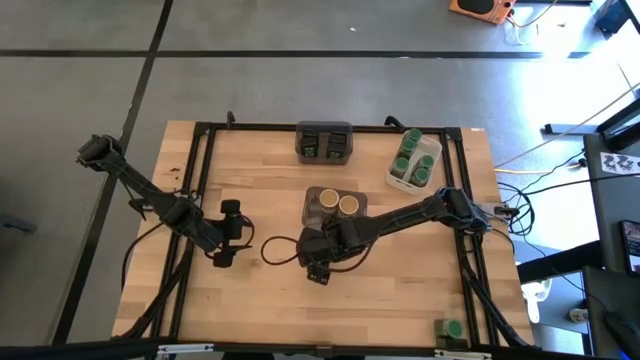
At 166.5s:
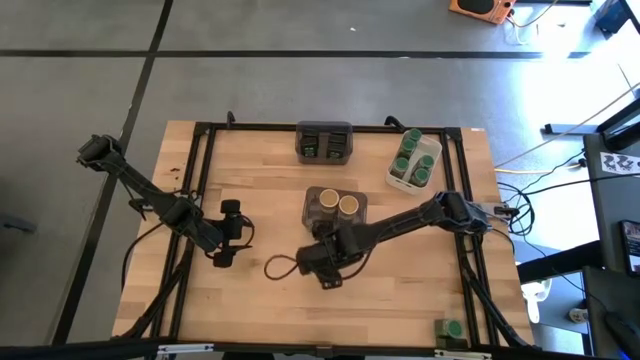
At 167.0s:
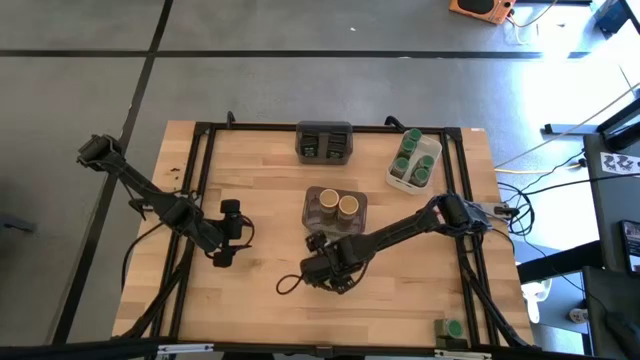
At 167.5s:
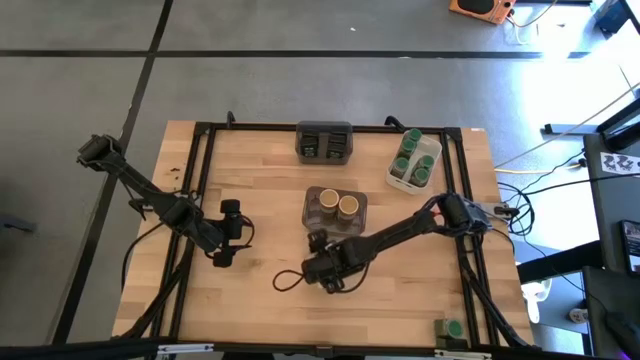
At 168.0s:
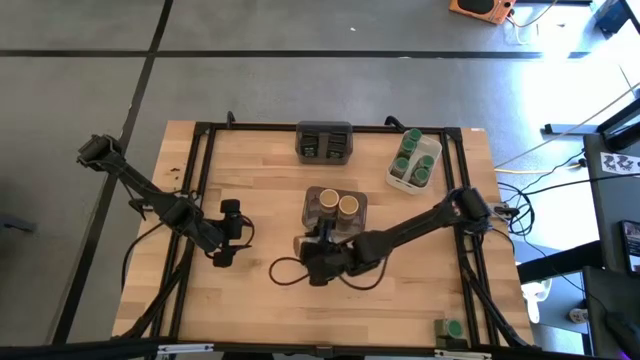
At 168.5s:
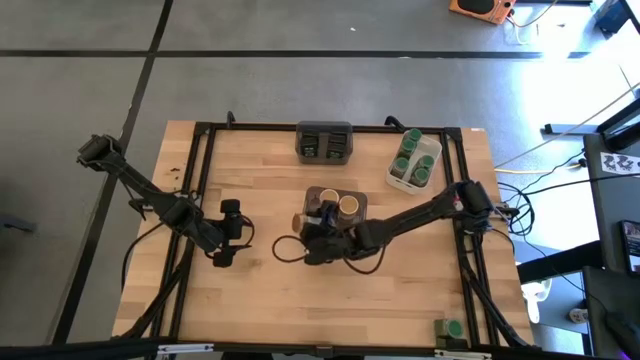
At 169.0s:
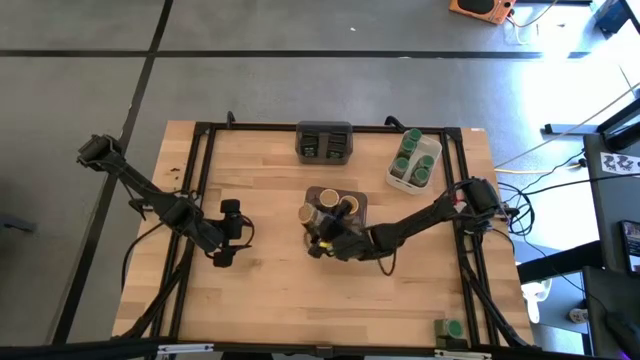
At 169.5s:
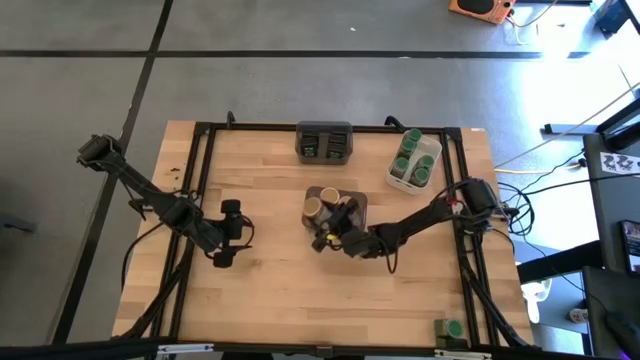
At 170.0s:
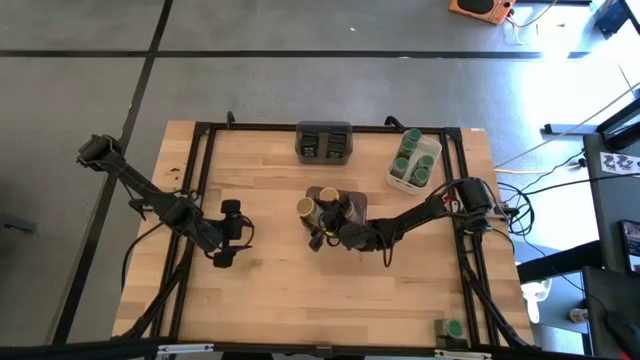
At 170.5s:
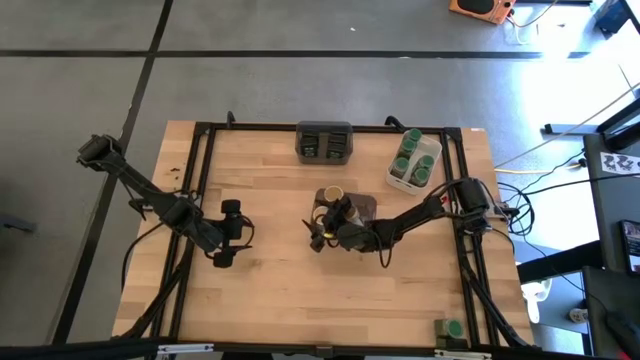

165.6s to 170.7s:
Task: Sort spices by type
Put the golden seasoning bottle into the bottom black bin

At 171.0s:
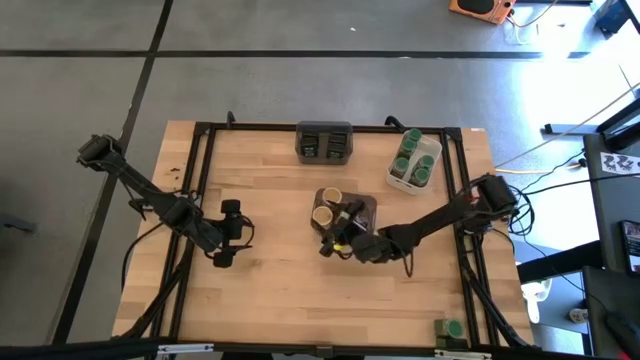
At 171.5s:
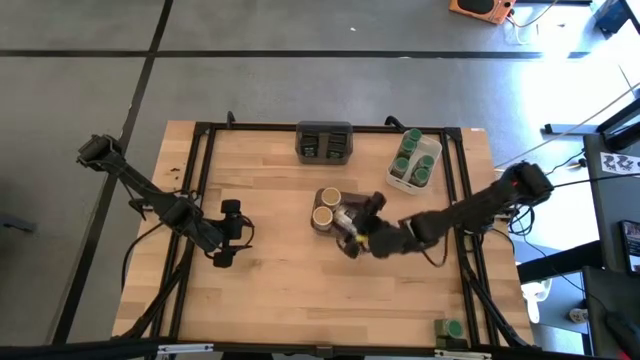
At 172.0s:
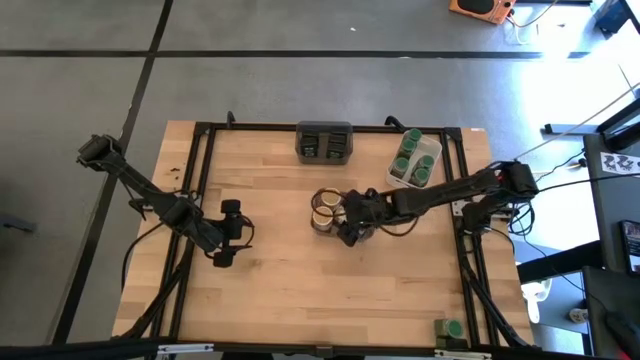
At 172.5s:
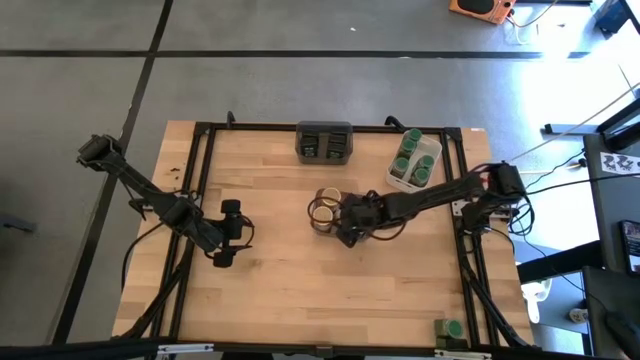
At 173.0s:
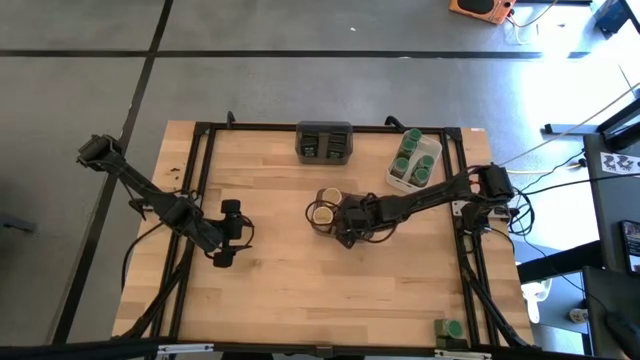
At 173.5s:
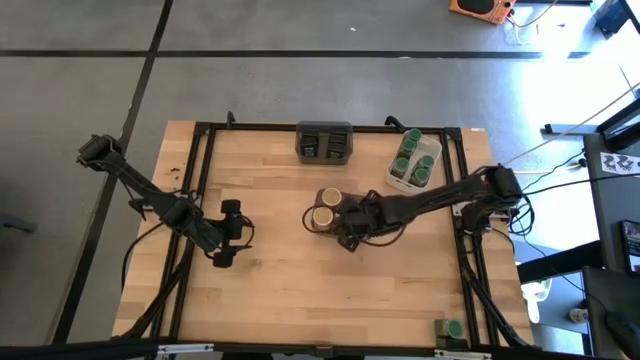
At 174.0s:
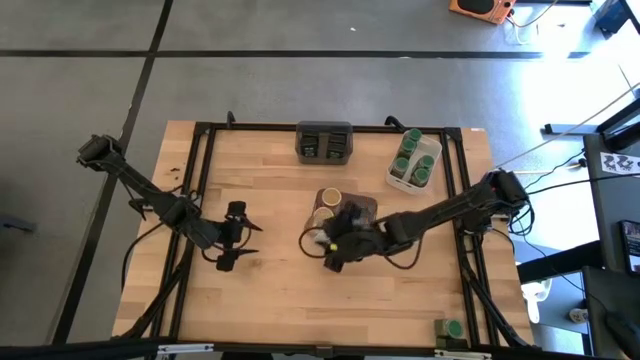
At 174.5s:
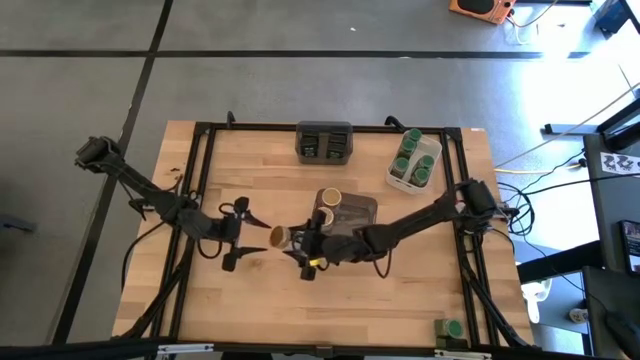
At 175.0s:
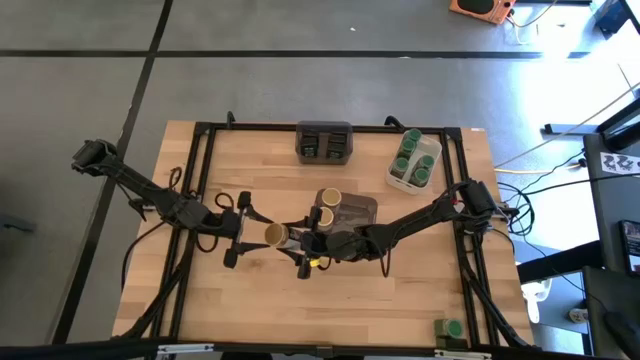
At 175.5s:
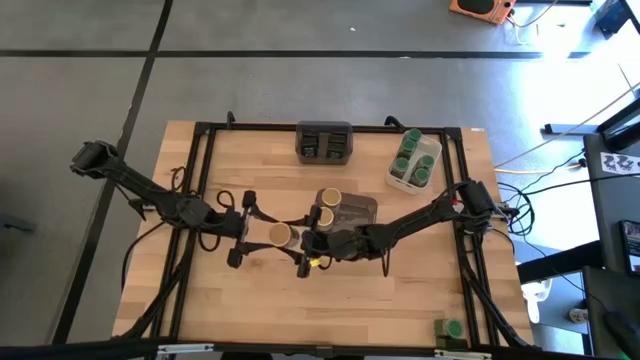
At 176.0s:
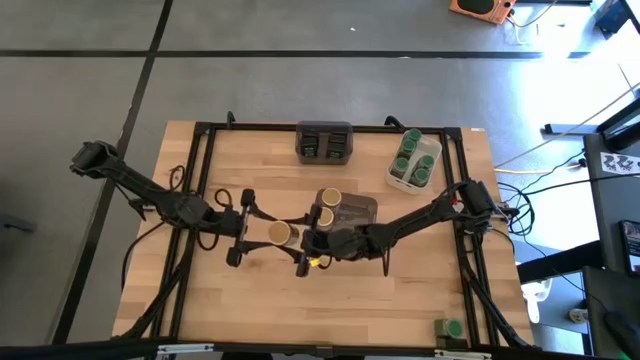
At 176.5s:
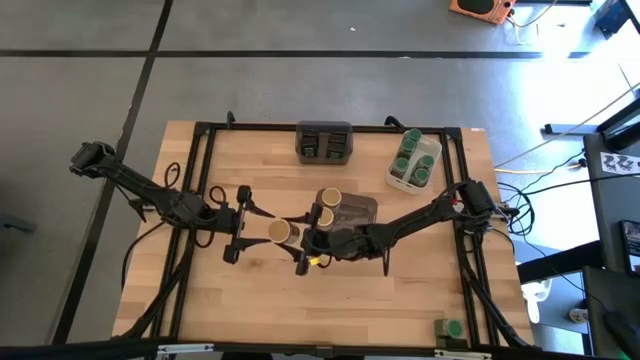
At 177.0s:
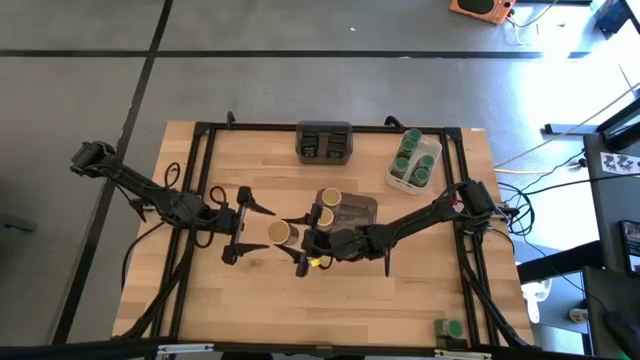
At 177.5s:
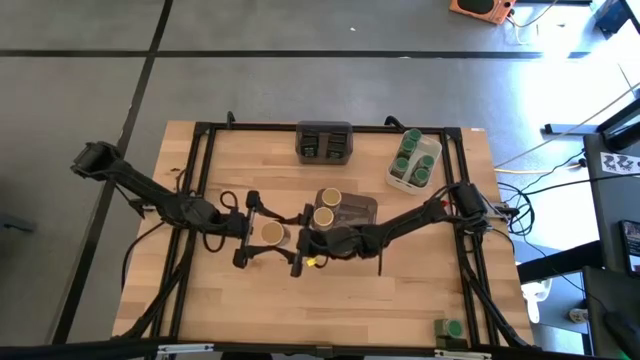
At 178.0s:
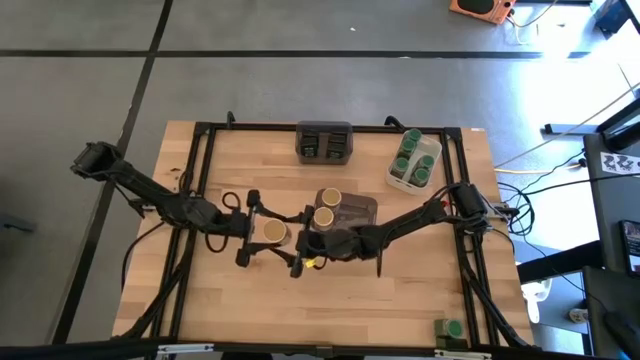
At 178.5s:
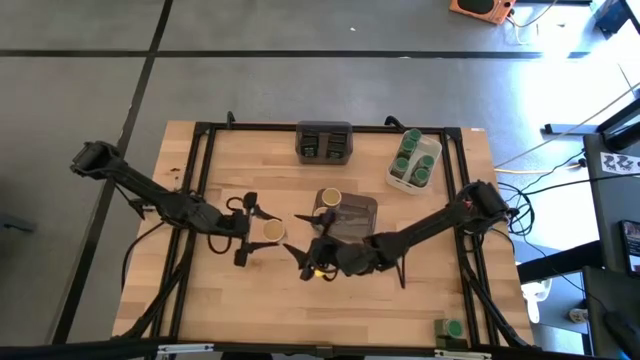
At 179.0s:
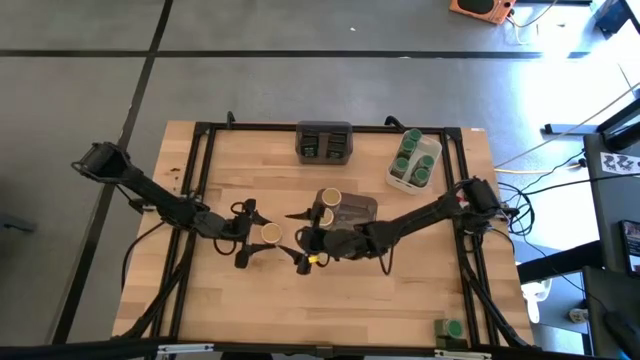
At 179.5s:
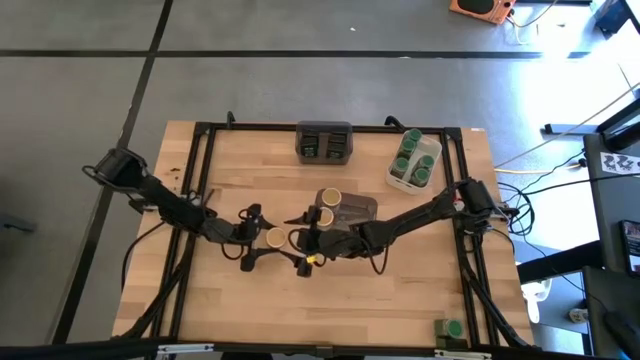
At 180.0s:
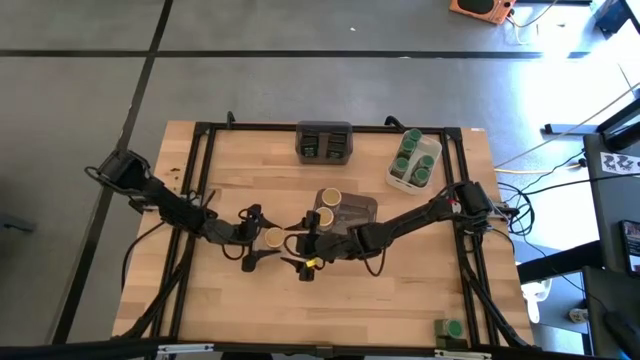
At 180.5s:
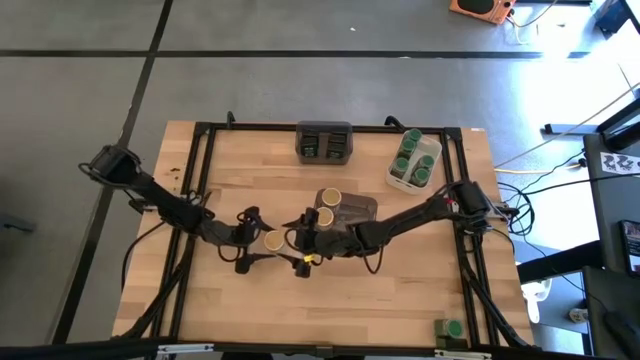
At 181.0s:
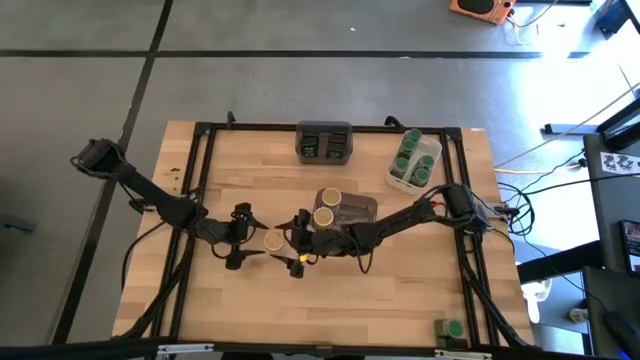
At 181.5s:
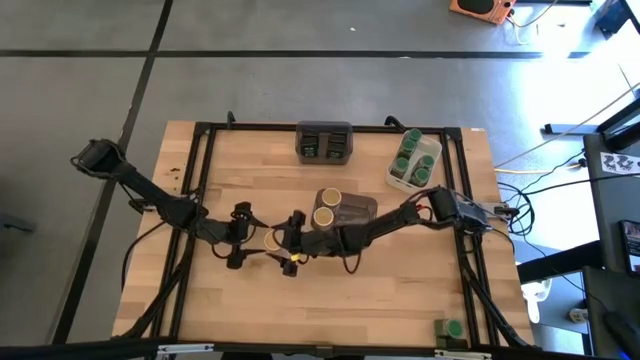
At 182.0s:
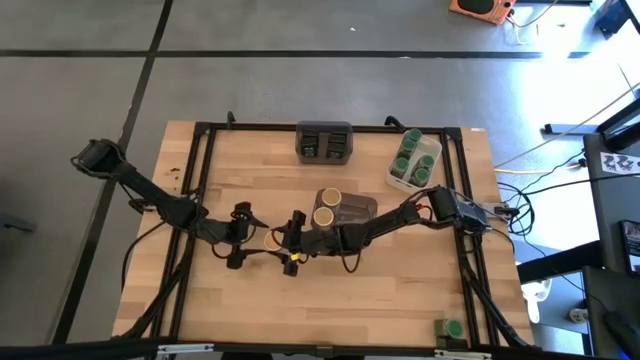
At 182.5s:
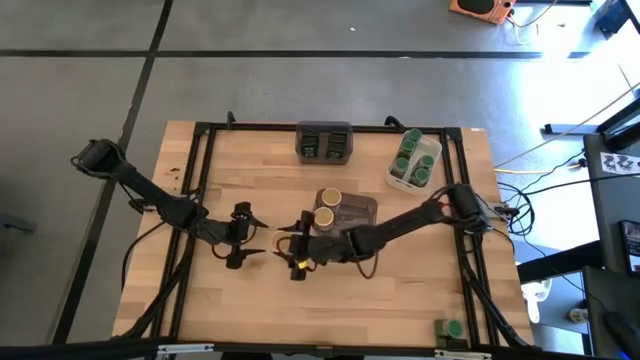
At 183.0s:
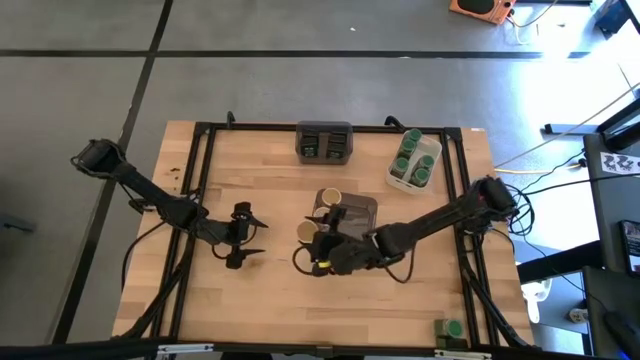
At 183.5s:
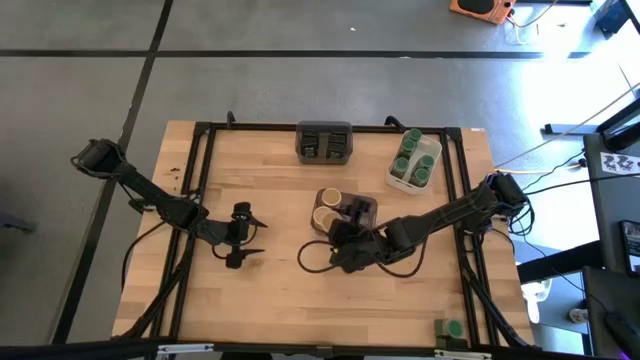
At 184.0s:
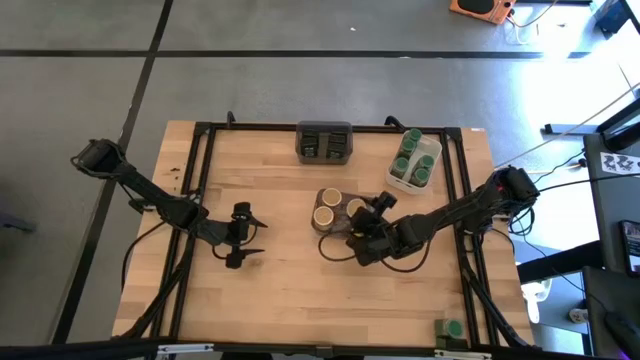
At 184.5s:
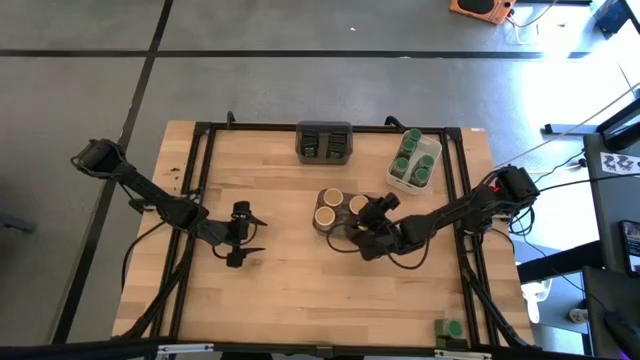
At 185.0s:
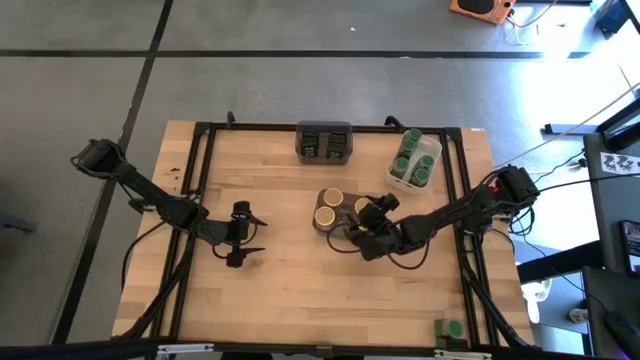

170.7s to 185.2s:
Adjust the golden seasoning bottle

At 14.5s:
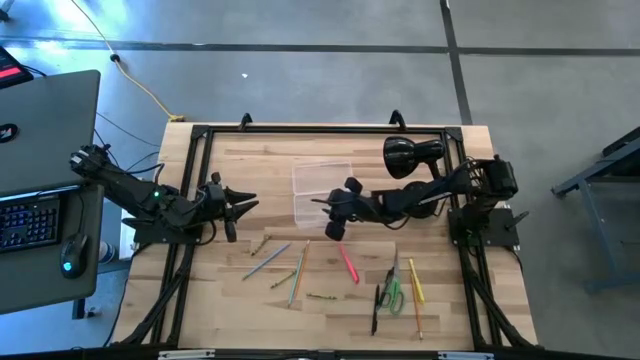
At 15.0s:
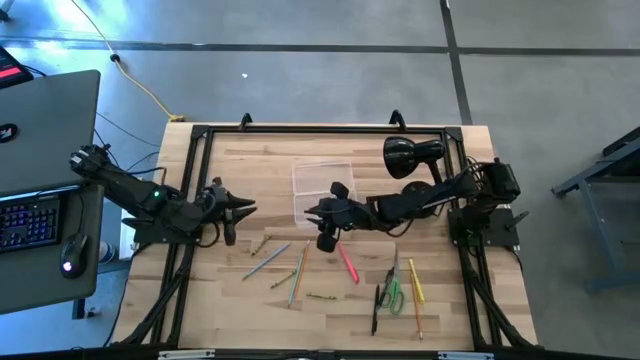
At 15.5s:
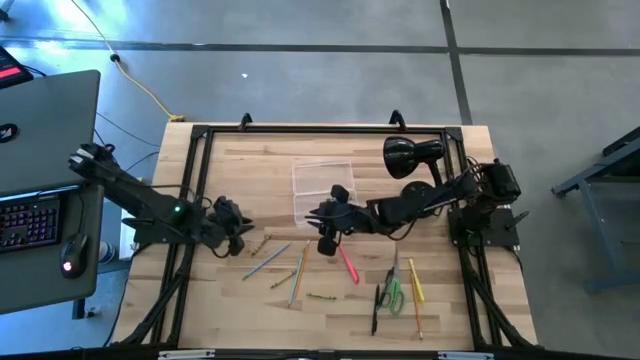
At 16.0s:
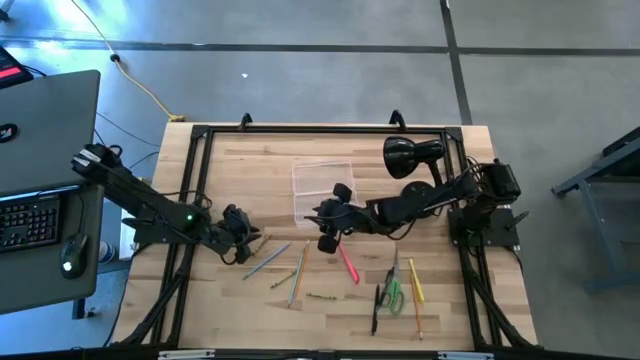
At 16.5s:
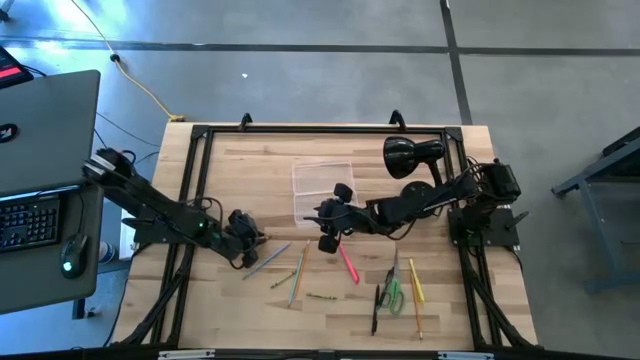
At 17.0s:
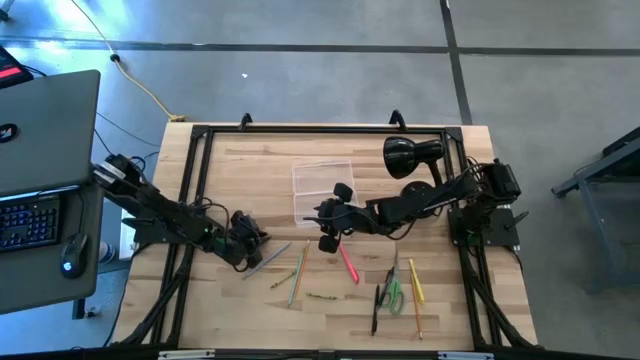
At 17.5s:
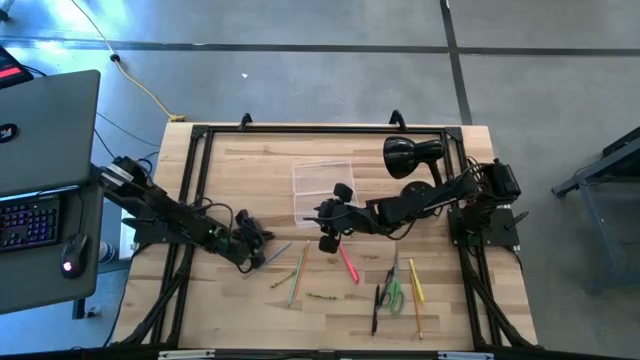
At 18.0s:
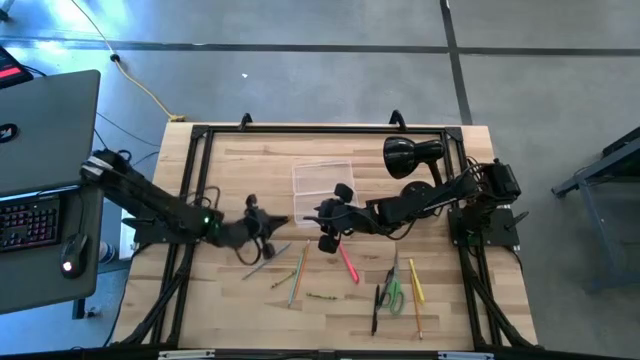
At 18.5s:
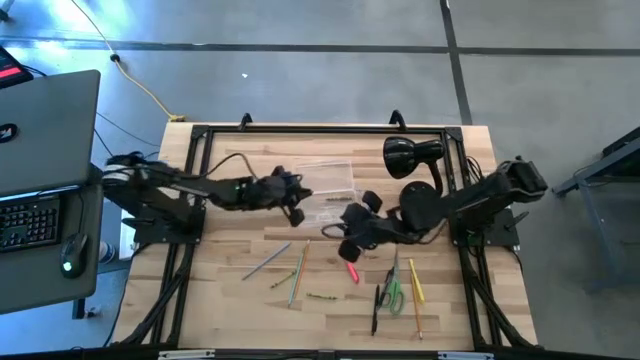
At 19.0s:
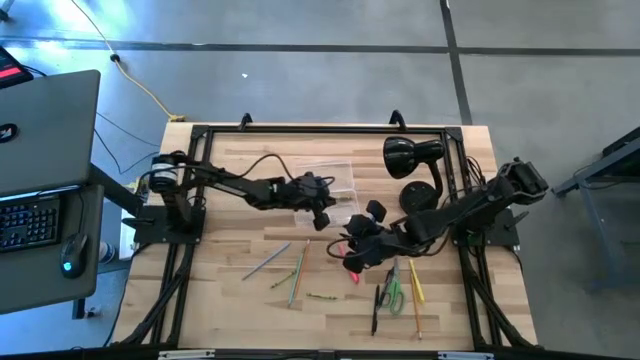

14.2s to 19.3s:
Task: Pick & place school supplies into a supply box
Put the top green crayon into the transparent supply box
